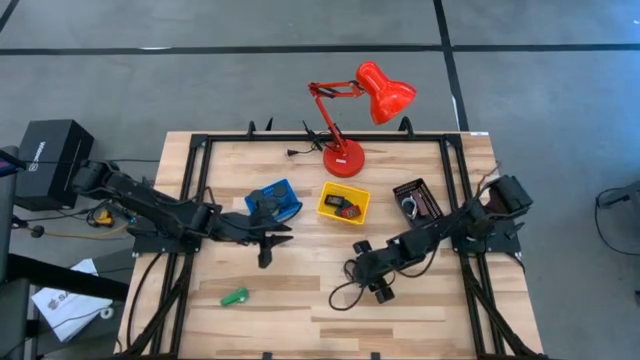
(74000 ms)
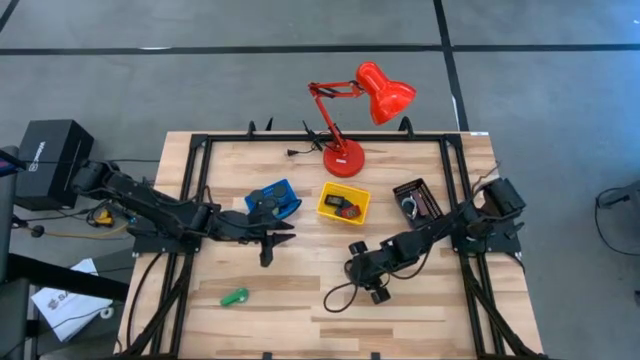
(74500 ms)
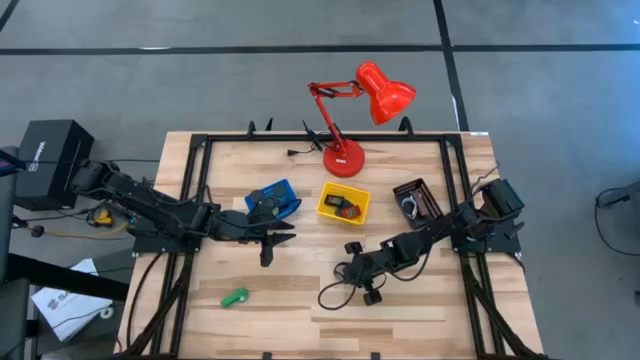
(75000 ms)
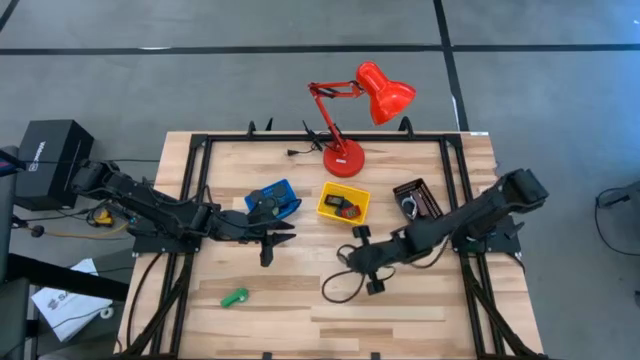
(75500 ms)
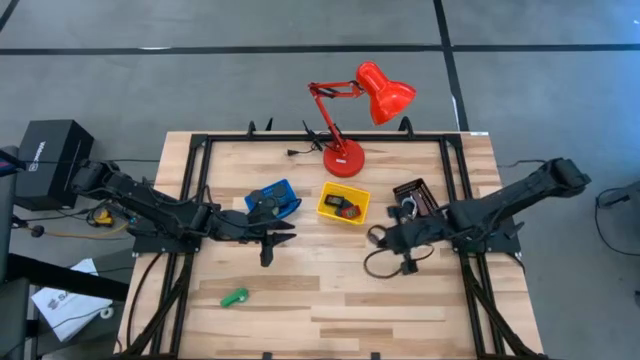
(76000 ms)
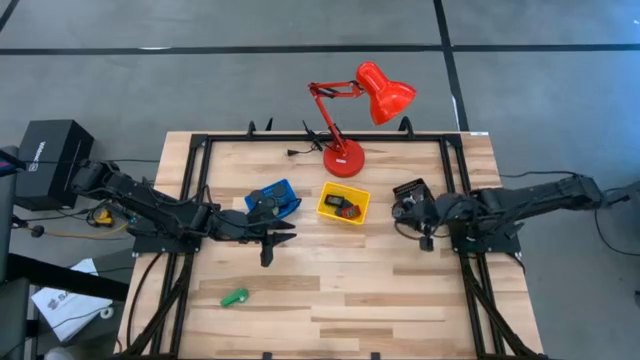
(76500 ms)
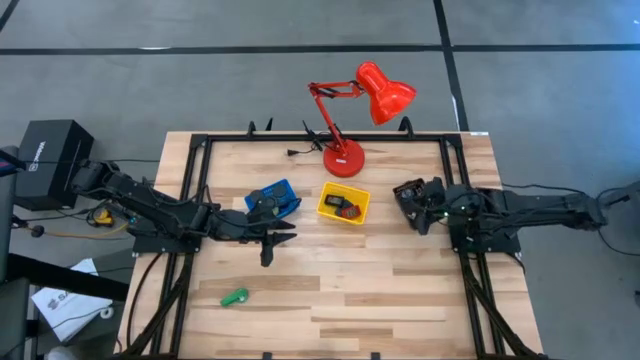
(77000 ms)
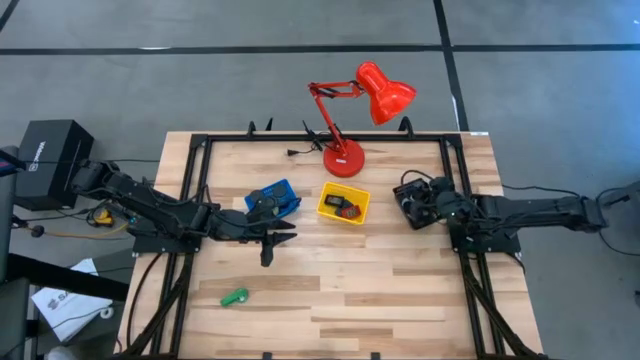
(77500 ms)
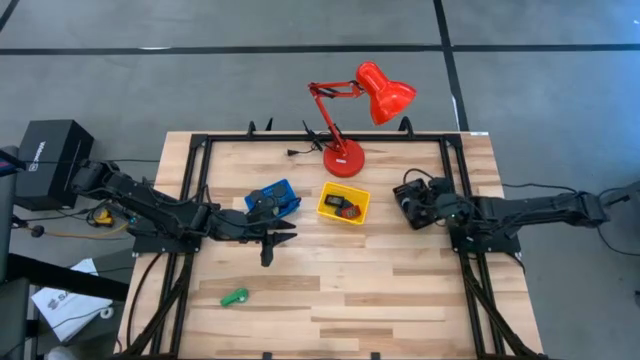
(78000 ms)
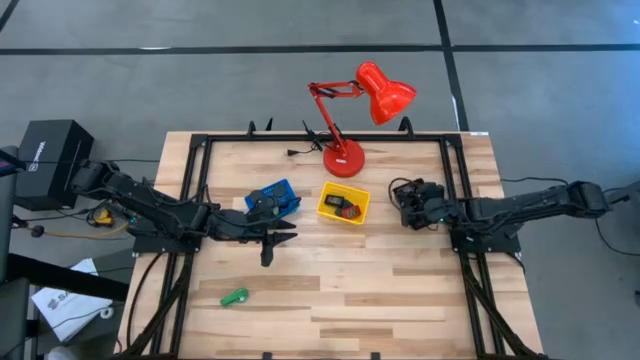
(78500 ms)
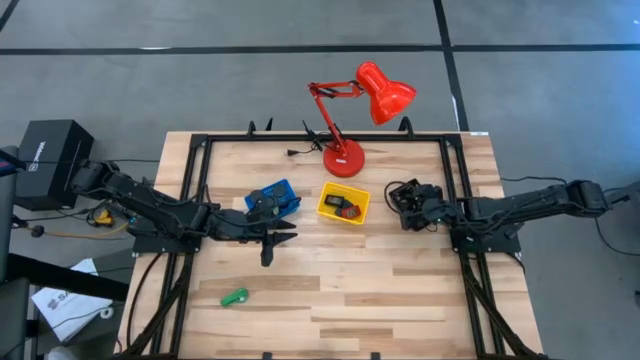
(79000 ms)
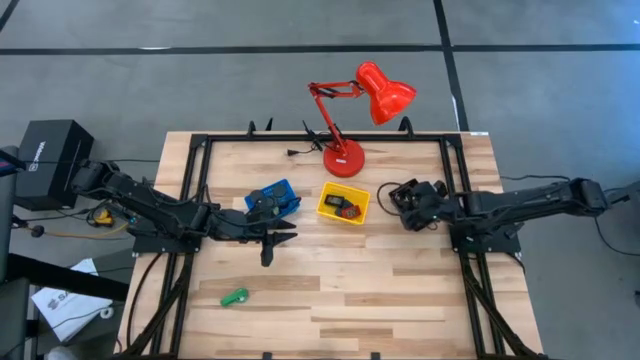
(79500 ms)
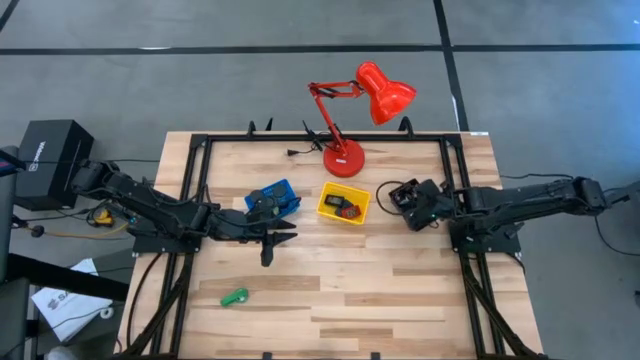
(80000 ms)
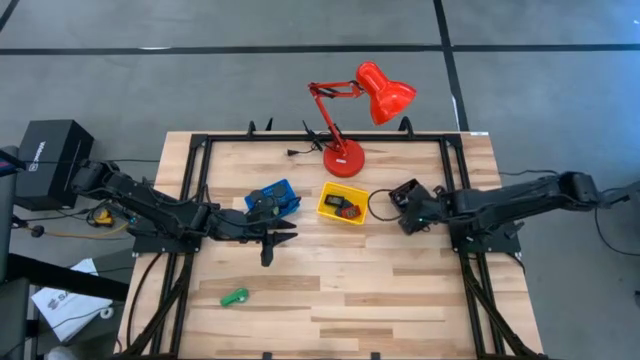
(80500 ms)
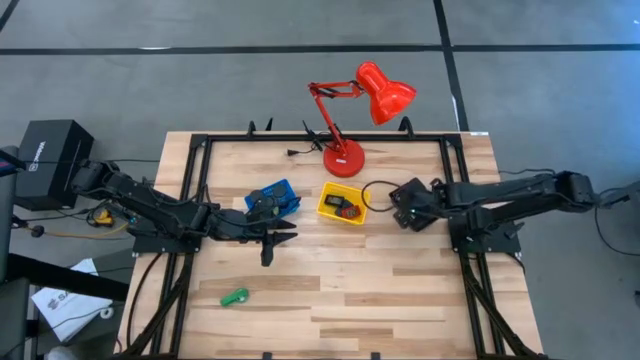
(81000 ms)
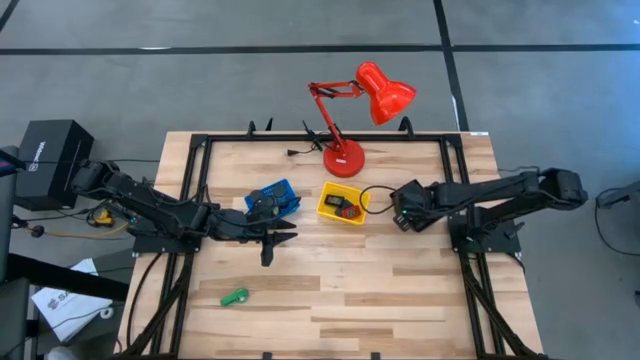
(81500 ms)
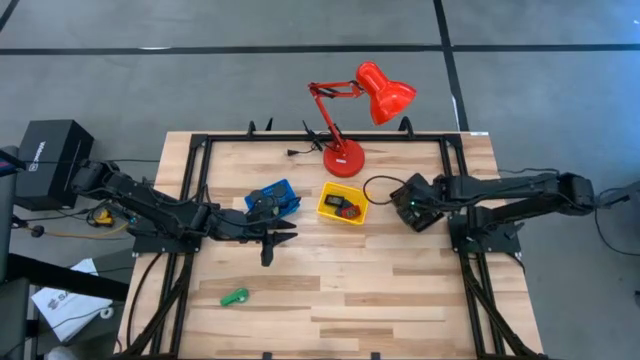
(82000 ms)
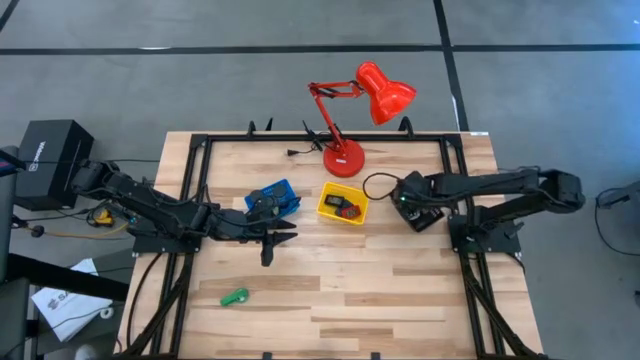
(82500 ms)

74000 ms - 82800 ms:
Task: Pick & Place Office items
Put the black wrist watch into the black bin

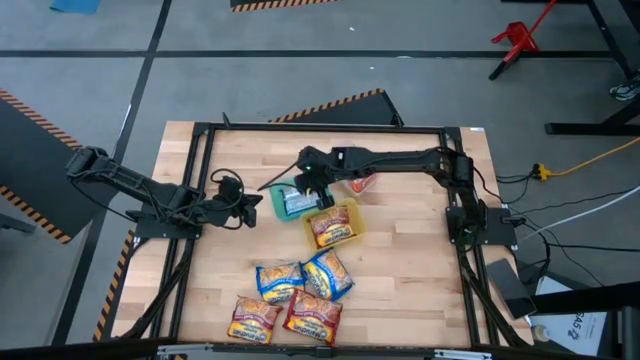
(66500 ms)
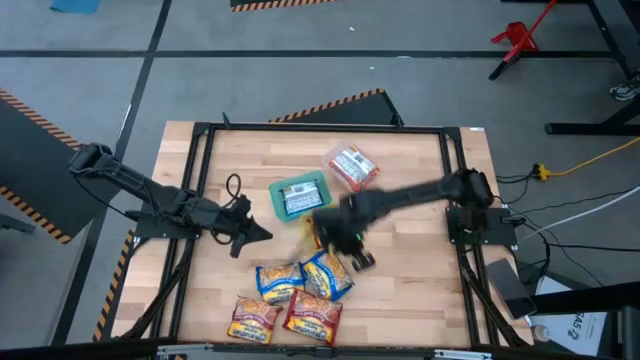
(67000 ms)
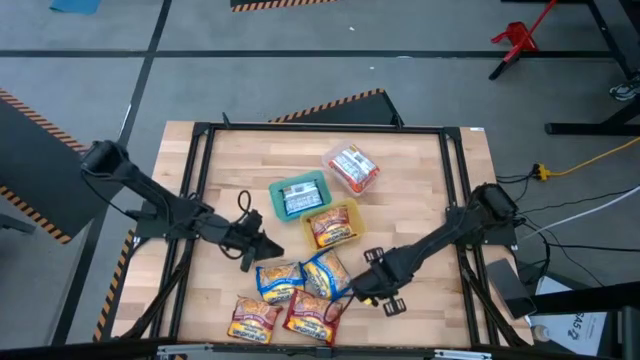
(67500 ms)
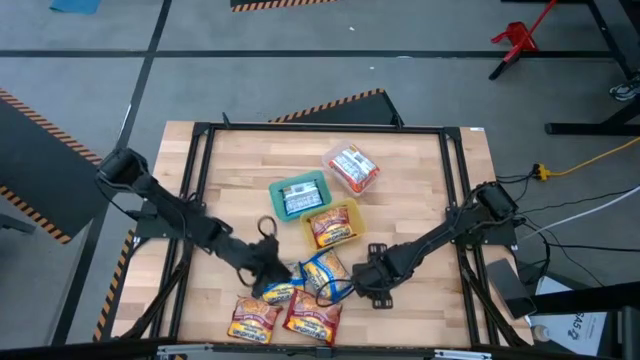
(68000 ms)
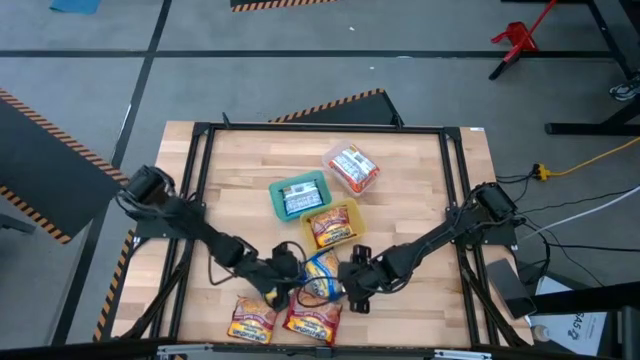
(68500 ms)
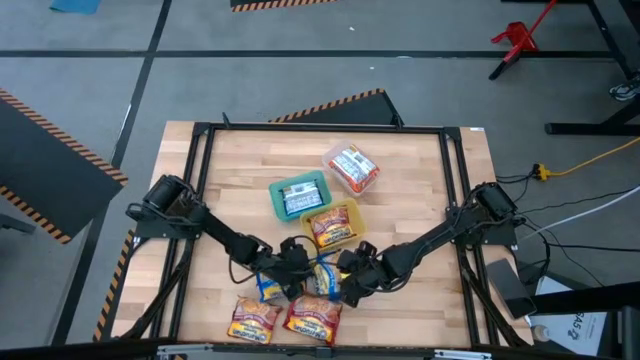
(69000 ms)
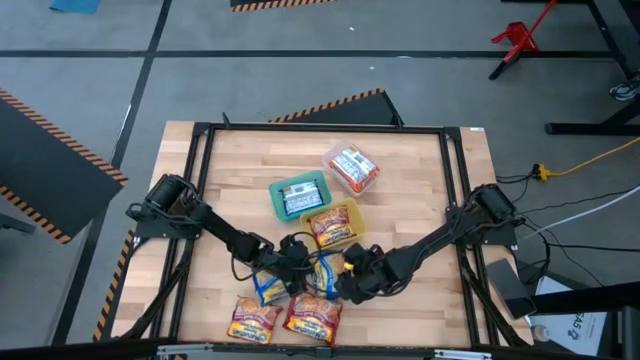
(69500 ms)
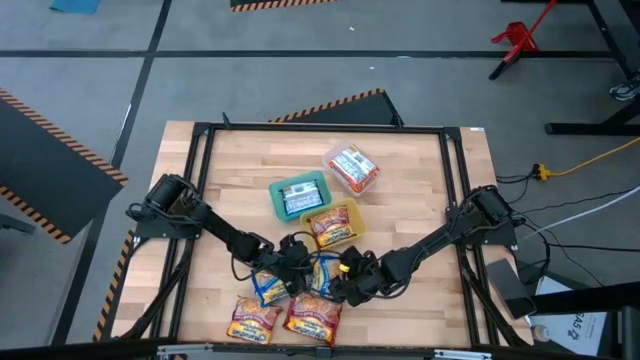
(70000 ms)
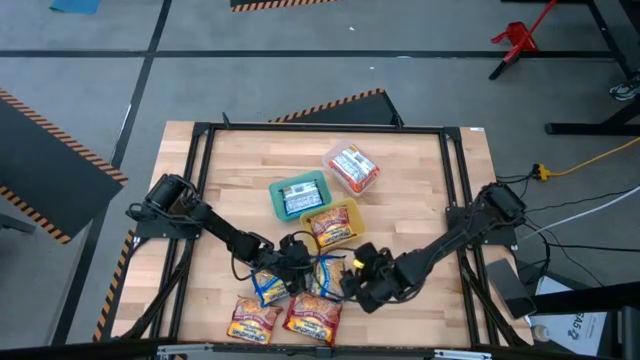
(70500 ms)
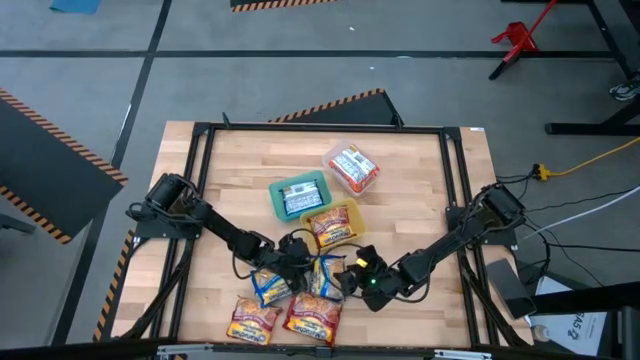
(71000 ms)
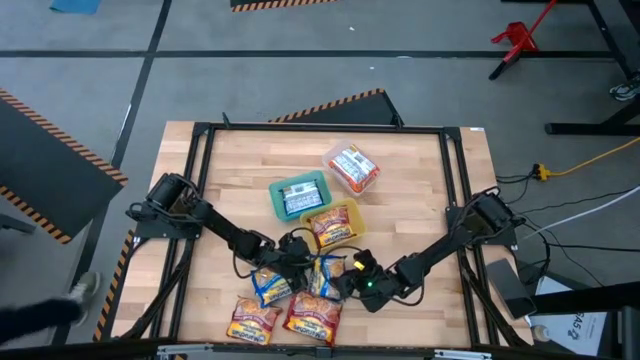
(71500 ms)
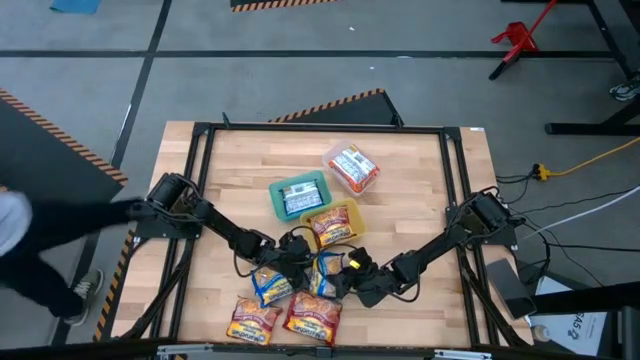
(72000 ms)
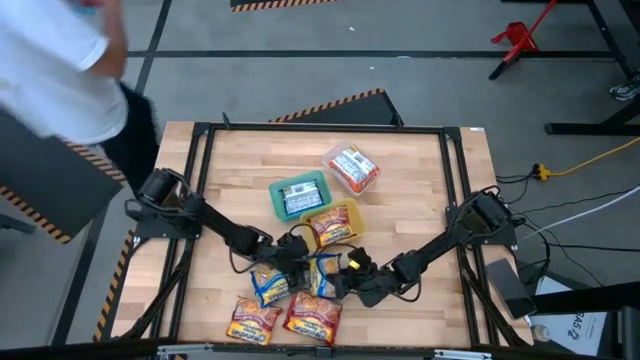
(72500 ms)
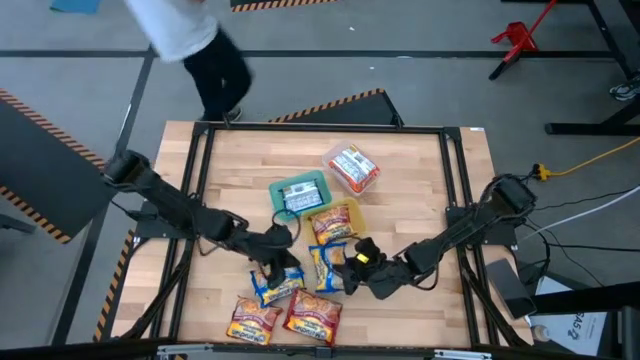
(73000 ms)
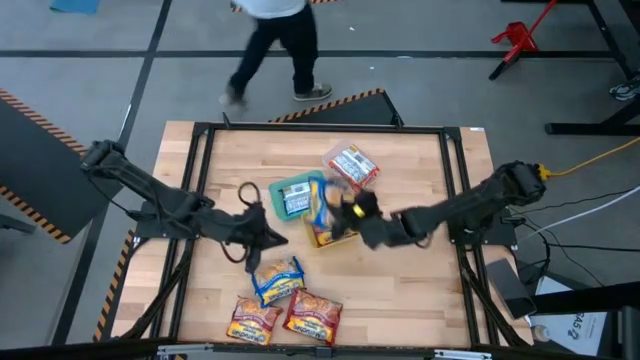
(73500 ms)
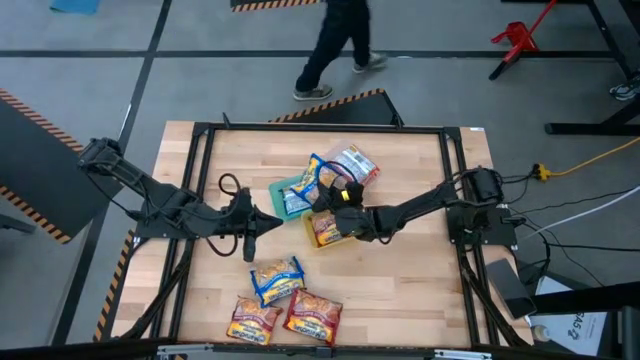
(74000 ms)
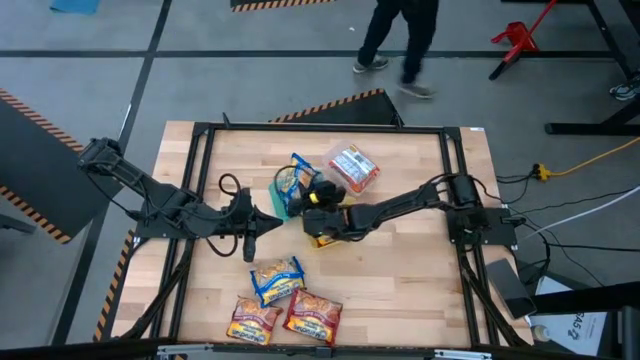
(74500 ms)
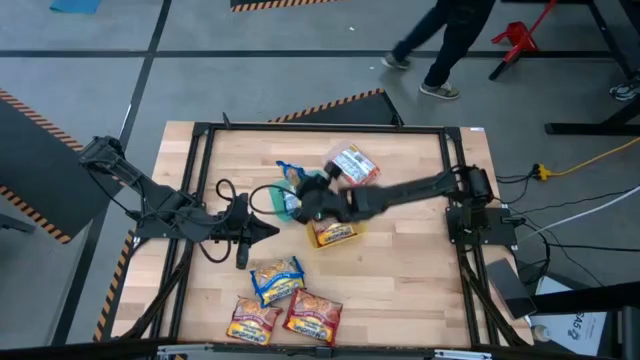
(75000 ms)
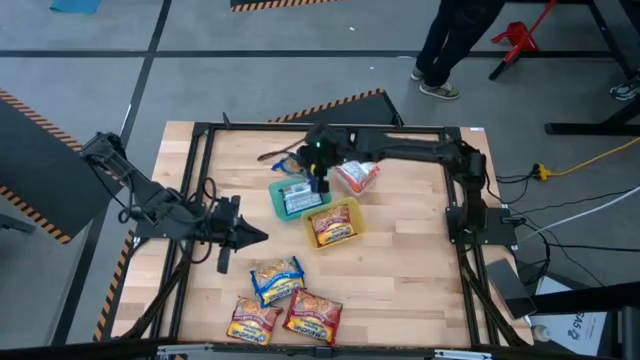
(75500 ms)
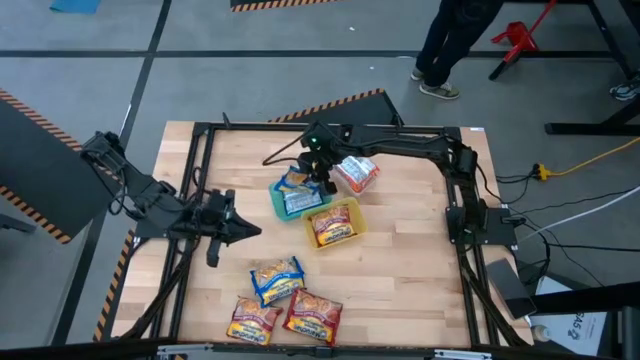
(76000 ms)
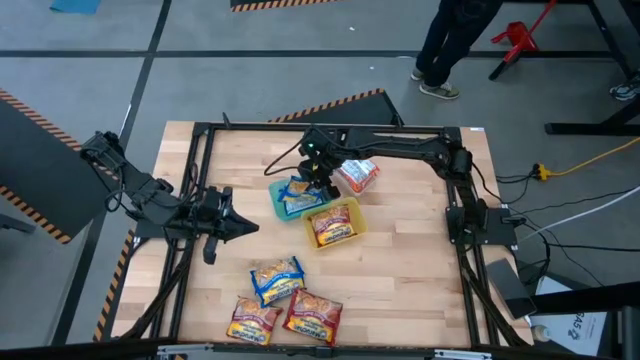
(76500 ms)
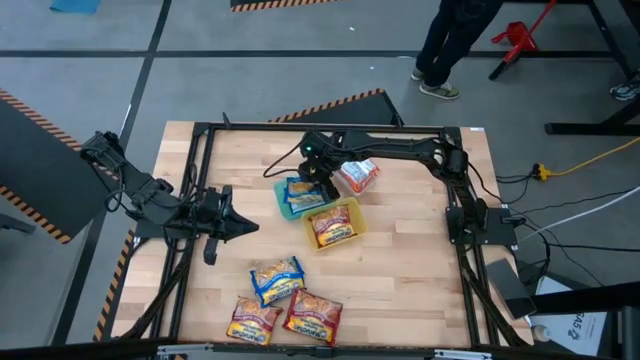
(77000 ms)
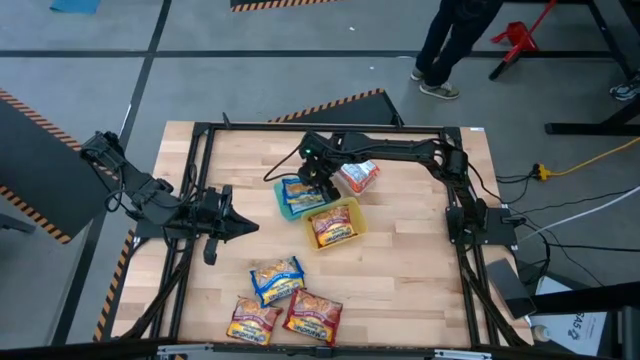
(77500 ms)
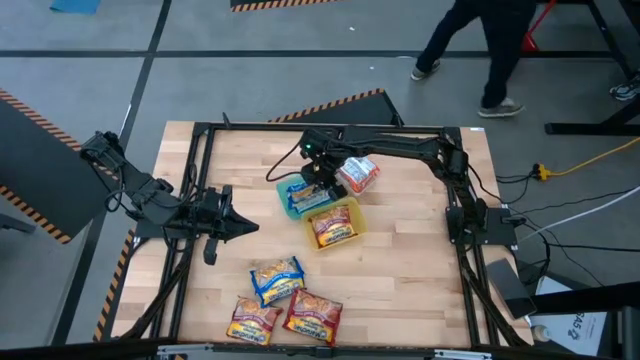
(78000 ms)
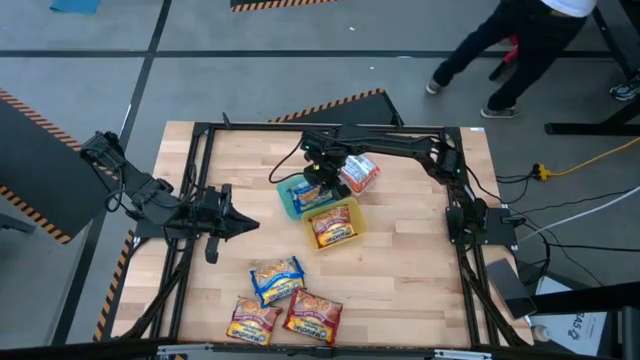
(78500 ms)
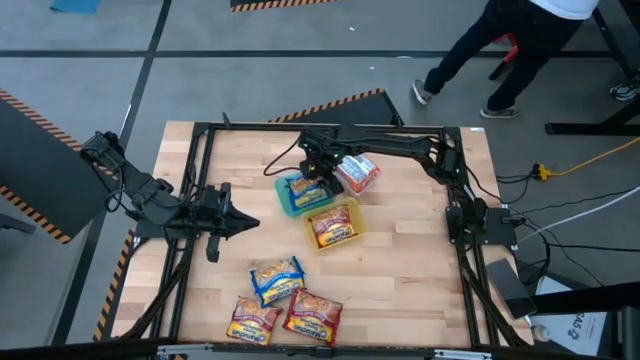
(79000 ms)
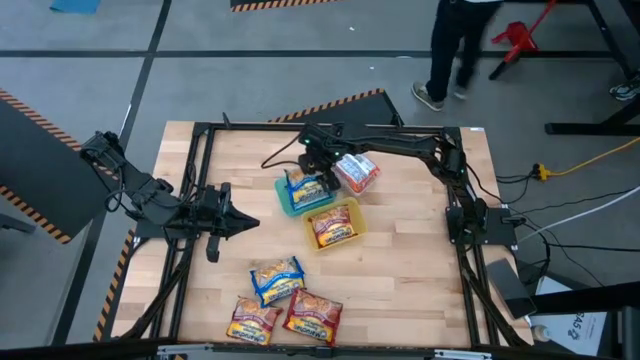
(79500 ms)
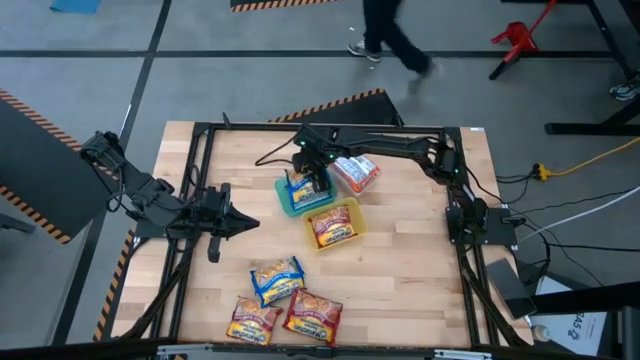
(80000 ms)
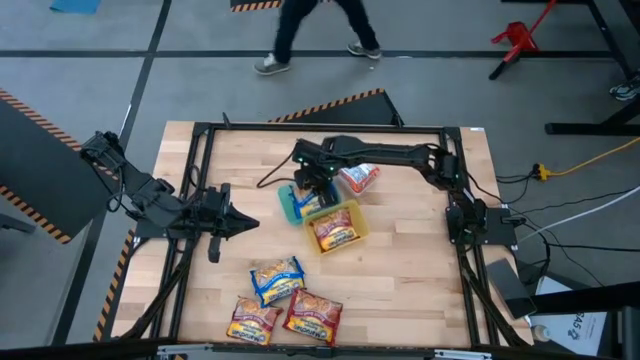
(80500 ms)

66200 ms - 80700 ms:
Task: Sort Maruchan noodles
Put the right blue noodle pack into the green bin
